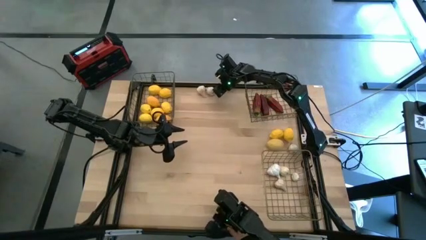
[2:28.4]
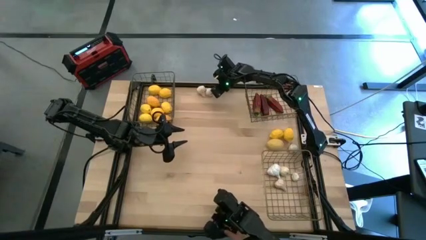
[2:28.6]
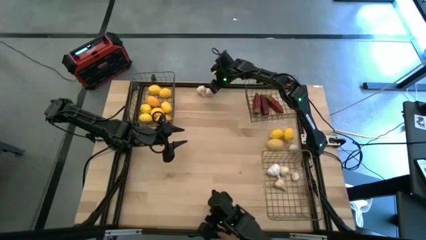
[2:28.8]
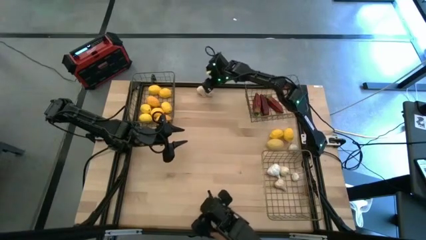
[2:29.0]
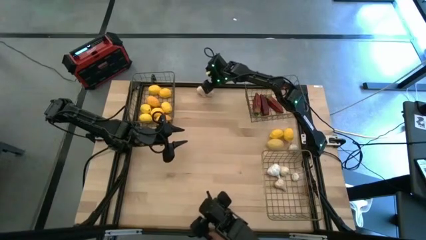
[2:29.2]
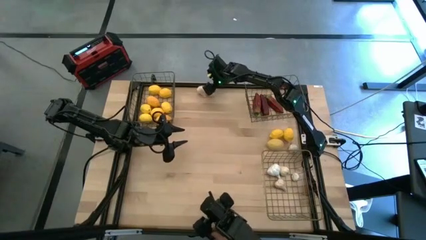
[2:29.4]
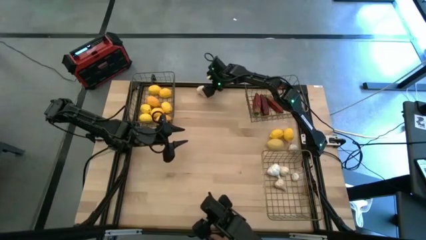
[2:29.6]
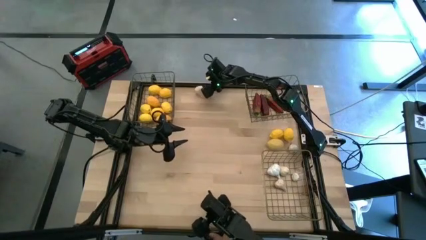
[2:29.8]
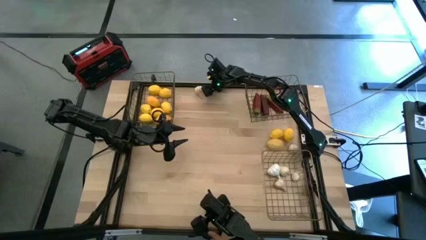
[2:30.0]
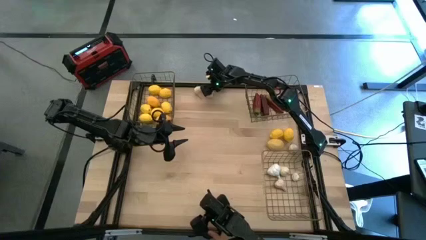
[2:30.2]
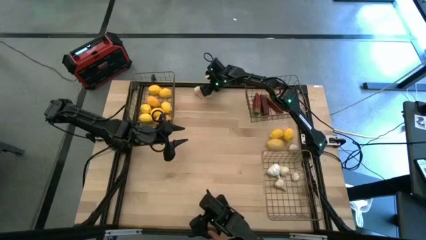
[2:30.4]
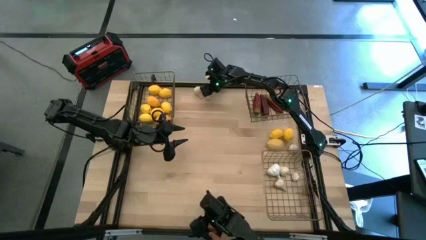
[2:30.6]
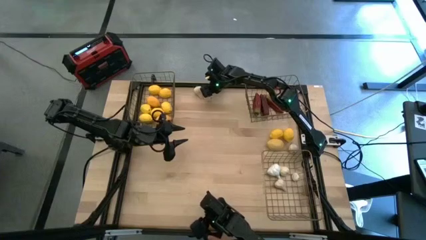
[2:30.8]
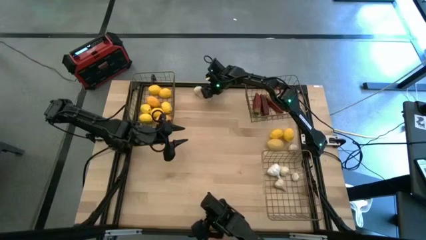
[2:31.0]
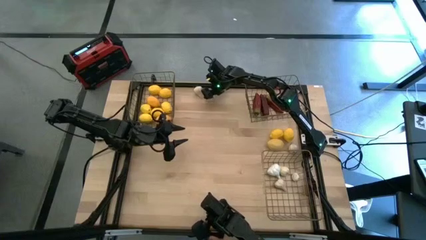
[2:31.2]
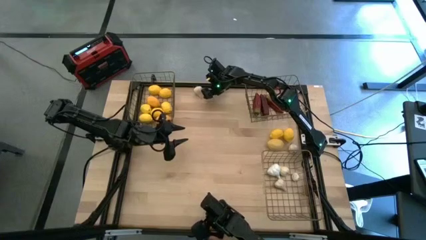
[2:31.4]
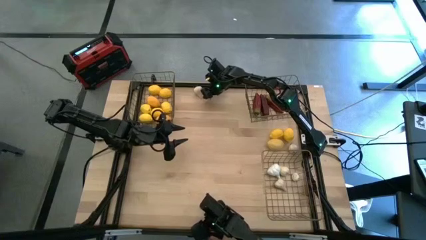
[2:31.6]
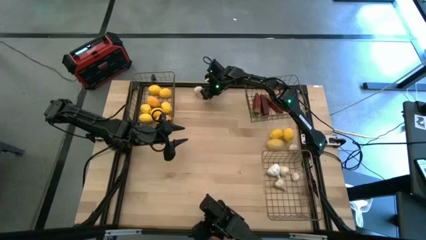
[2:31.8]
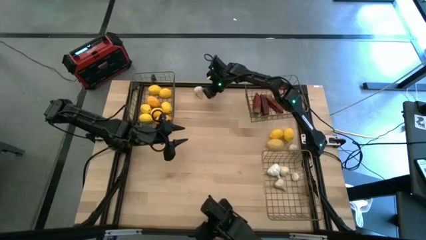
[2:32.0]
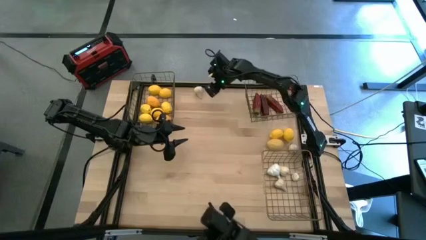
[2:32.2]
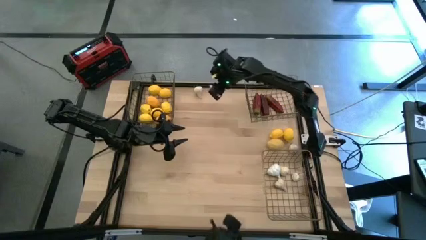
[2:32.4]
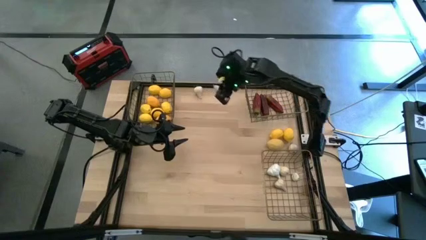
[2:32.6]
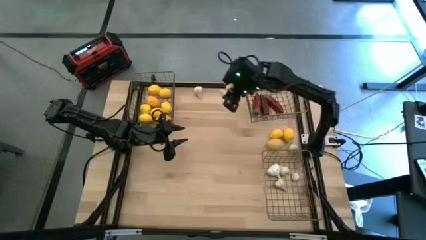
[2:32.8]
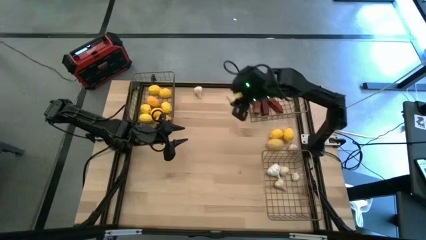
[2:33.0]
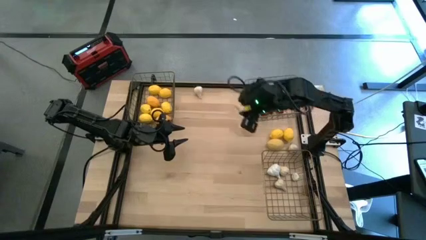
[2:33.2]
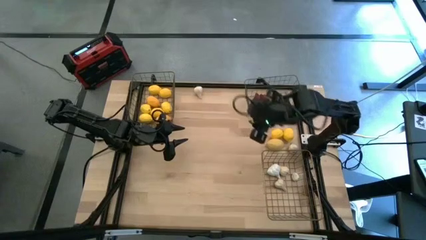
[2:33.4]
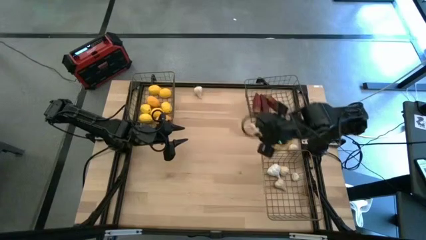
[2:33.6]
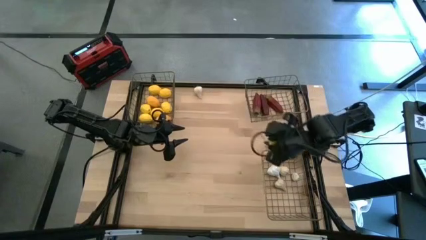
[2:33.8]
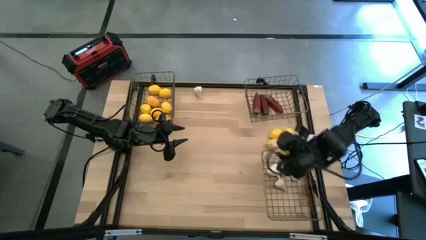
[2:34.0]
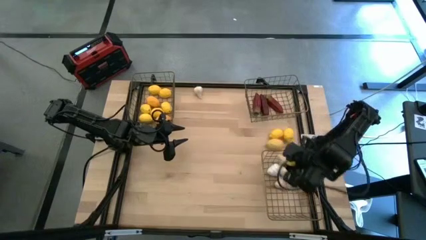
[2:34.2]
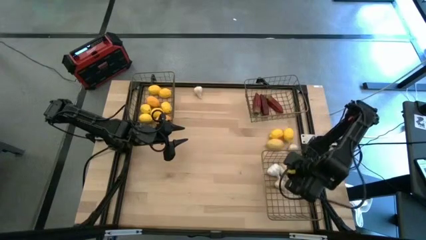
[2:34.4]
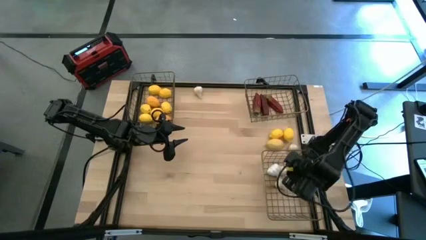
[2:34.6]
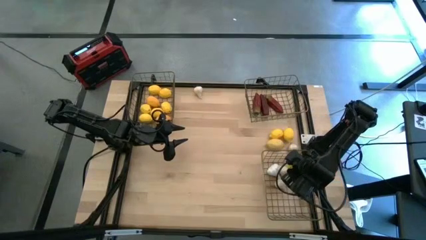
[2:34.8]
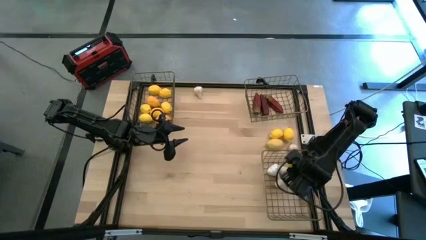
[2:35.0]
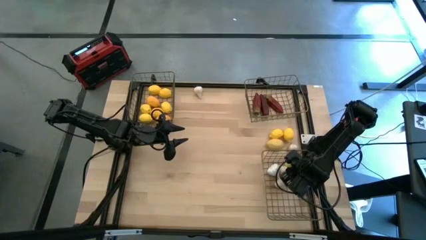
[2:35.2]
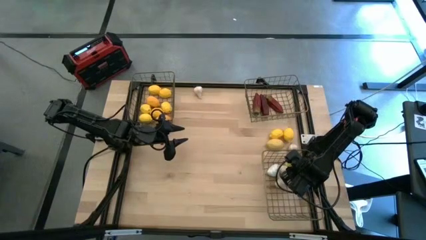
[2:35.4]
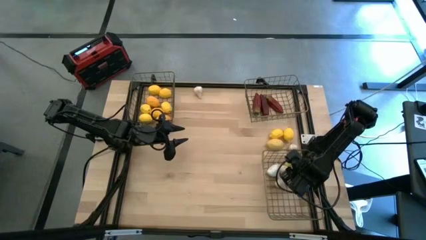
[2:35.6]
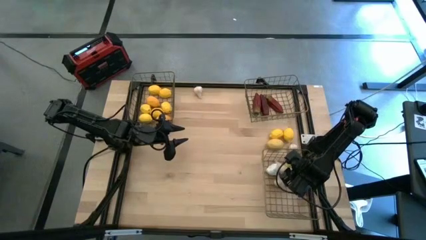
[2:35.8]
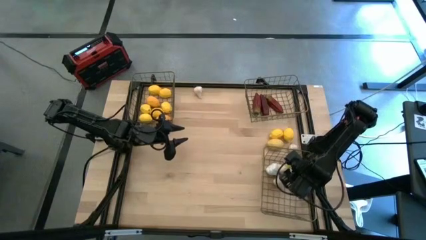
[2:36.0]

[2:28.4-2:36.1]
Task: Sort produce into baskets
Put the white garlic into the bottom wire basket

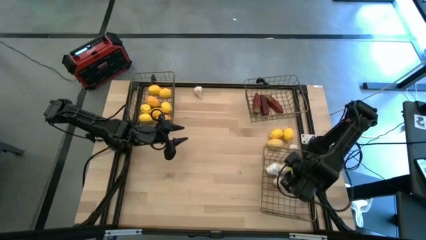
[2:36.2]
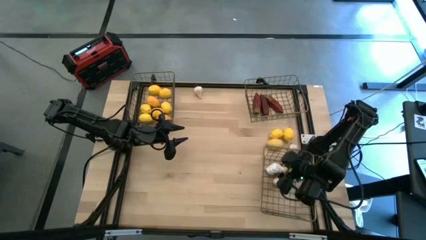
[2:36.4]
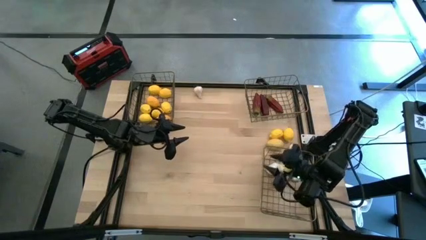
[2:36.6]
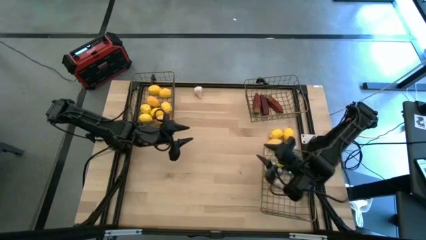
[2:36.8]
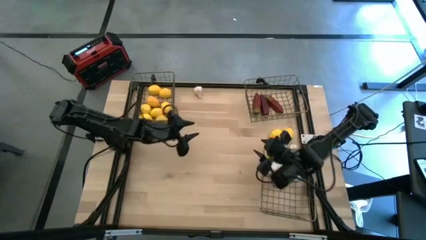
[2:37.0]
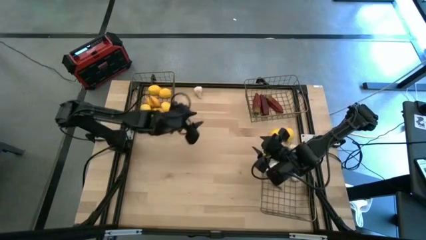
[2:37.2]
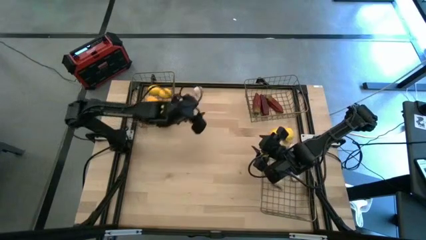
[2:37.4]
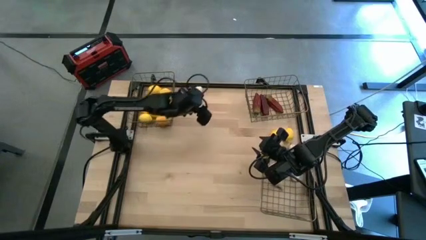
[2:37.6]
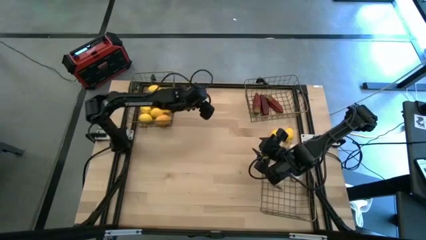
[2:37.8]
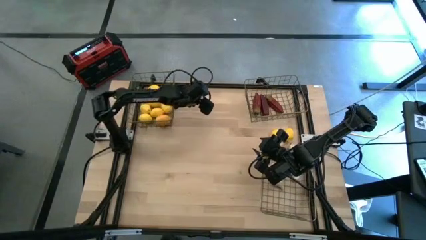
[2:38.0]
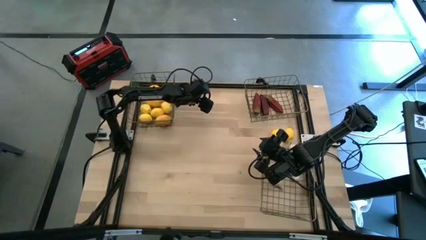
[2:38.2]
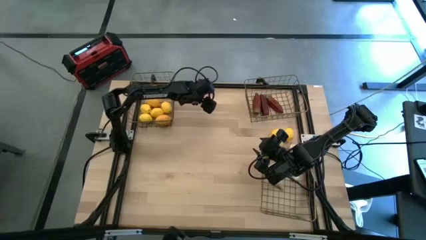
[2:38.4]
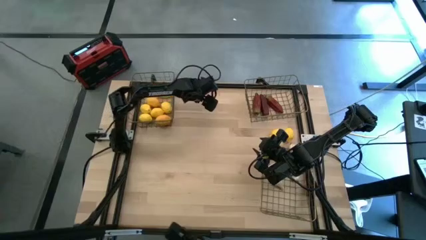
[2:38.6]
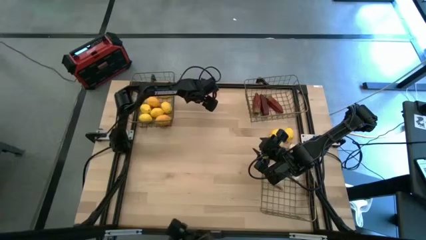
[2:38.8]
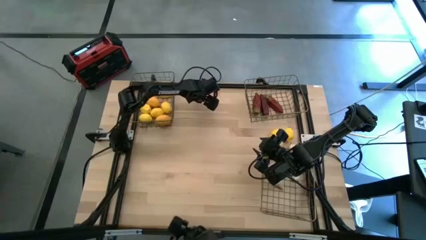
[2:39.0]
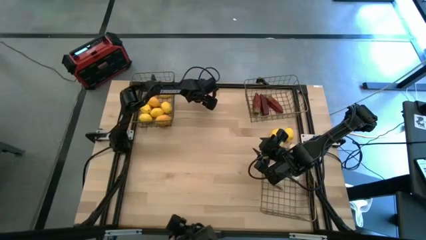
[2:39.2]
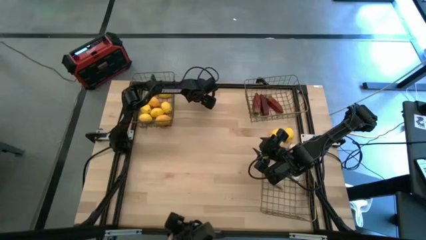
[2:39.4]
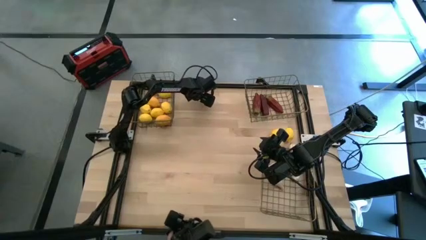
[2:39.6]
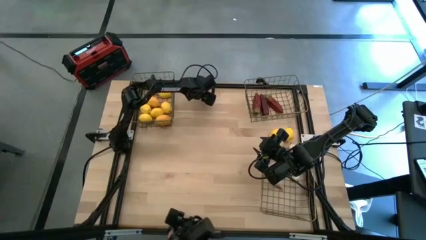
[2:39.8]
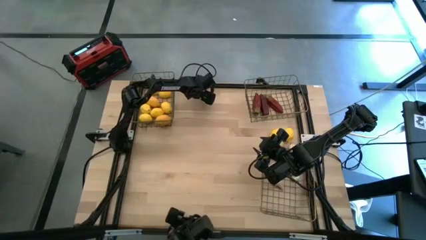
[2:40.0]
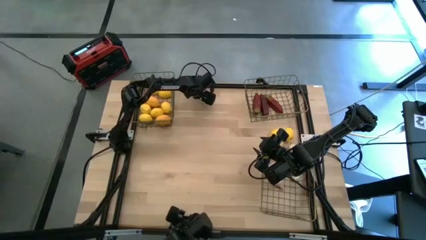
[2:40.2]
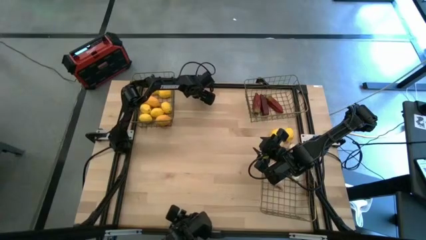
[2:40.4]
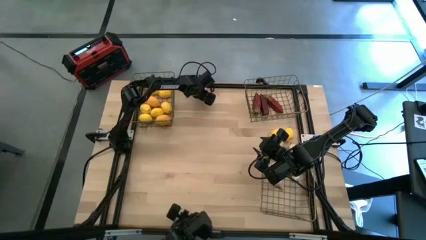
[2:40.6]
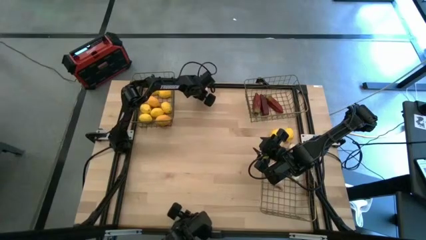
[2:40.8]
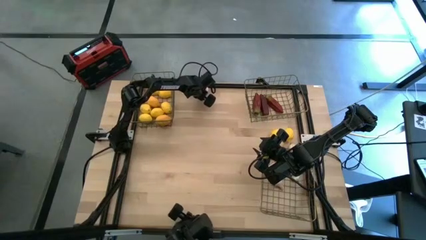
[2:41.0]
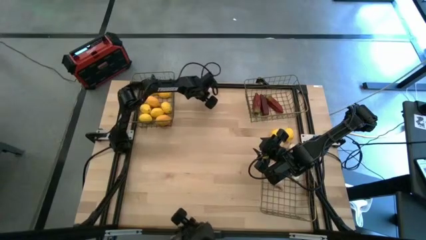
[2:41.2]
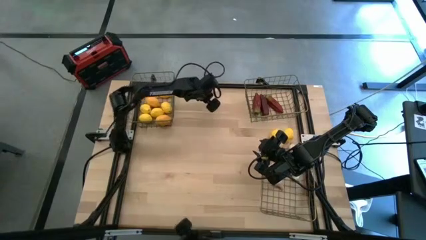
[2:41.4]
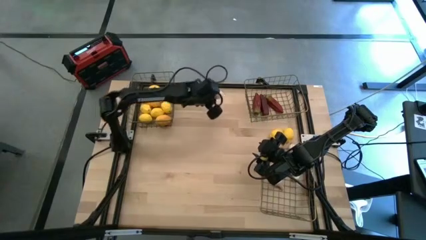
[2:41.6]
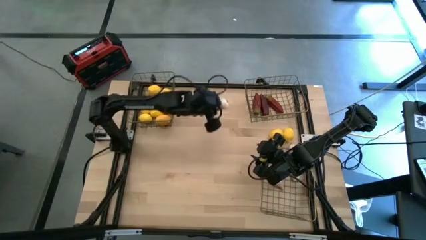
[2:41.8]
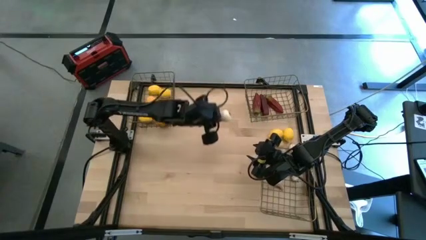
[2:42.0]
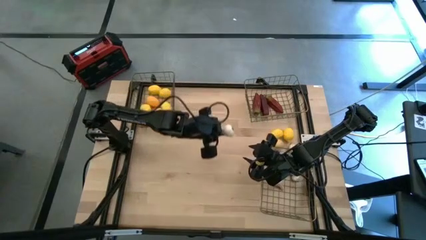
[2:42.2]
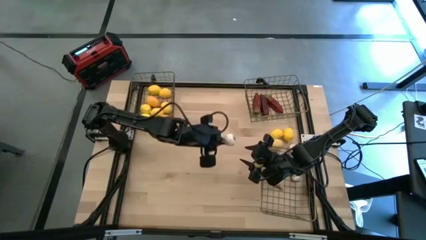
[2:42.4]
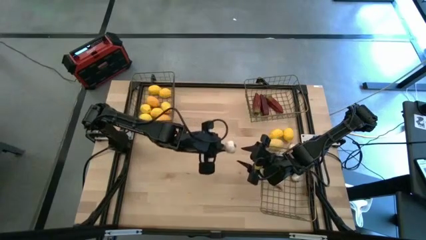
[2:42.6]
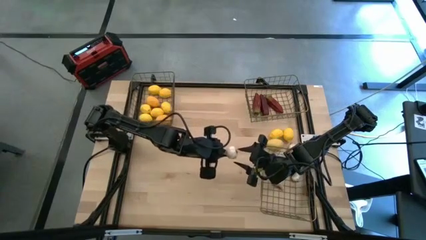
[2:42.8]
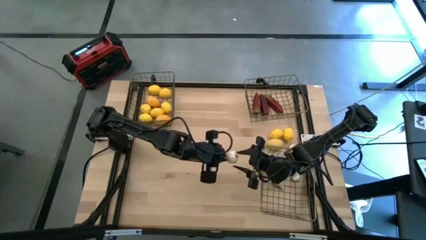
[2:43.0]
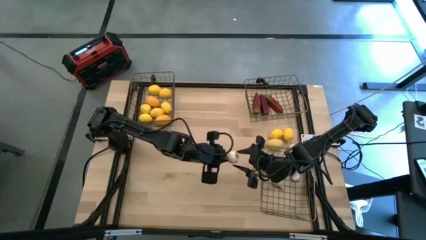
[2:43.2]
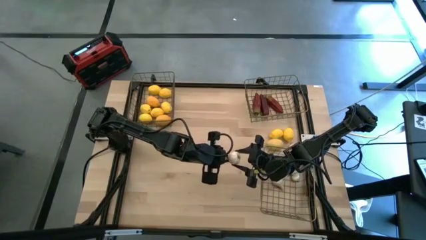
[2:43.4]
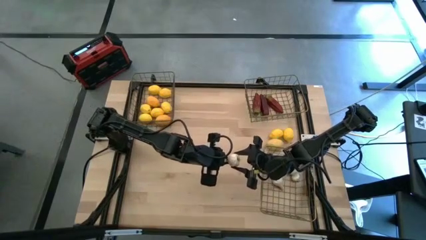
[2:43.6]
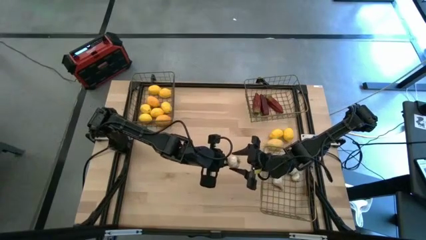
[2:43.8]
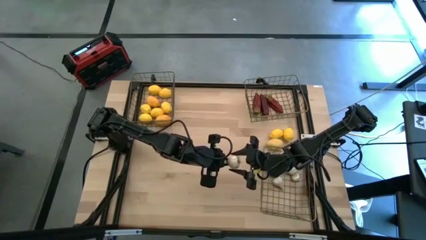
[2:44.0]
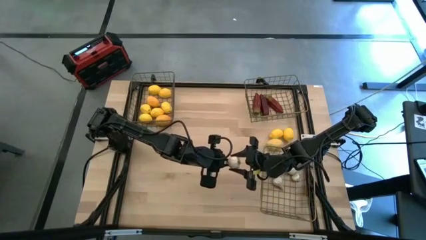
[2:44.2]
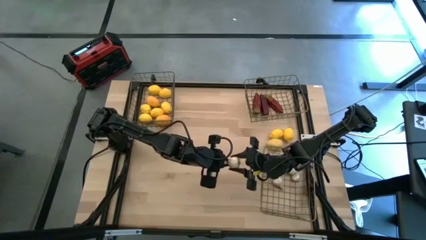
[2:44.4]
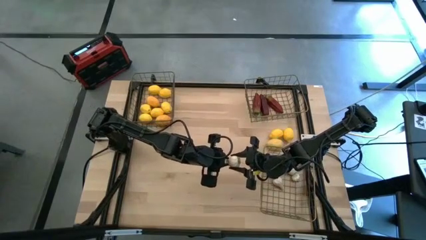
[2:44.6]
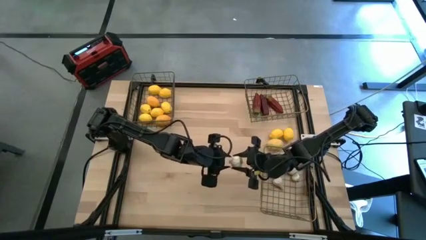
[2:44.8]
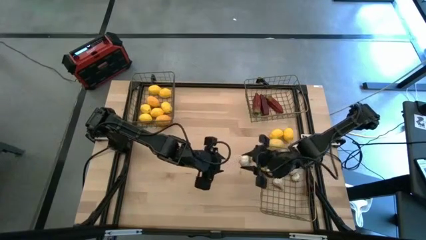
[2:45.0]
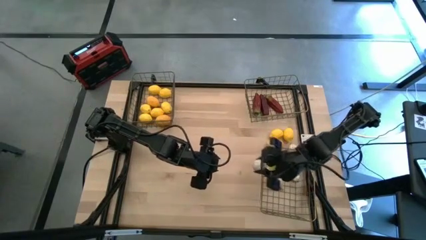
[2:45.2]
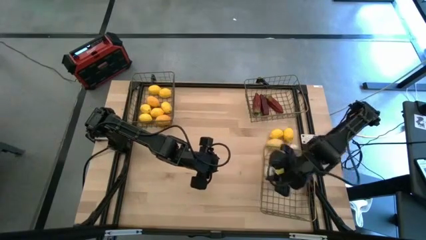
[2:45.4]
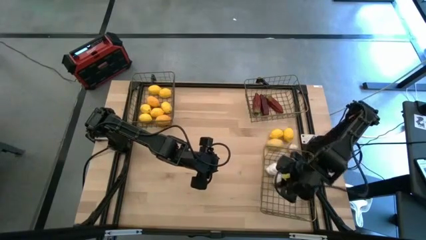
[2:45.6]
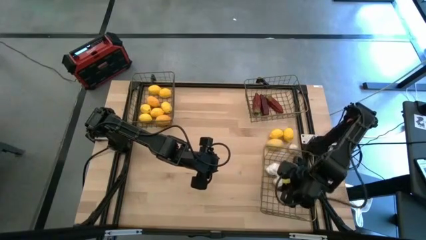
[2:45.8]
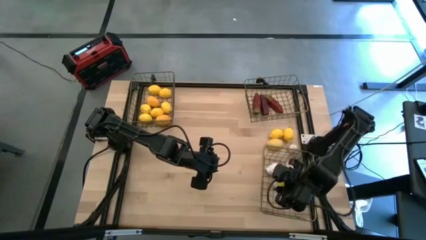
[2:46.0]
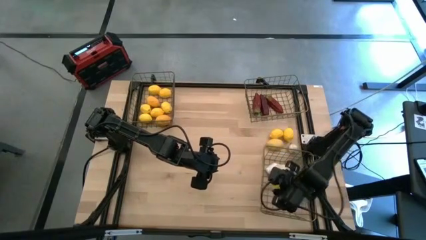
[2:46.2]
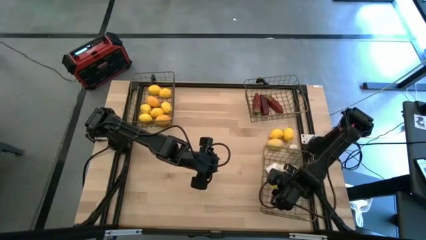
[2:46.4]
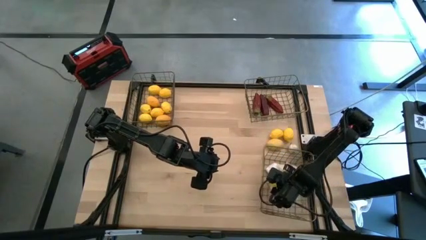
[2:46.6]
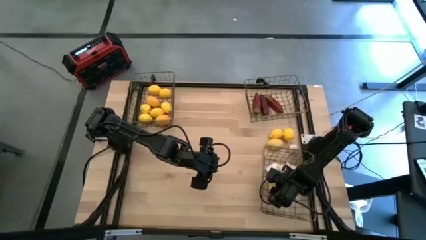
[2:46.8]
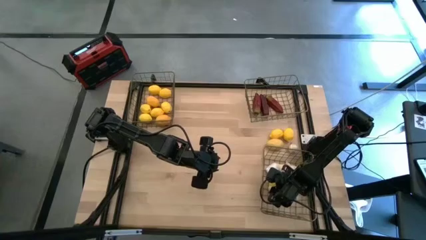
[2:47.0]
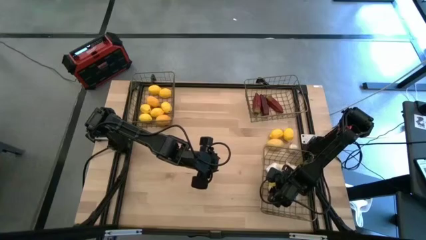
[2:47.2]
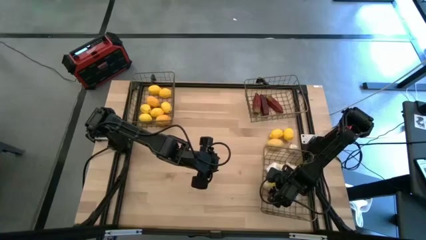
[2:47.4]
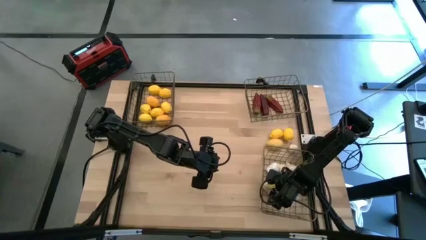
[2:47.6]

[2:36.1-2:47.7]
Put the white garlic into the bottom wire basket
